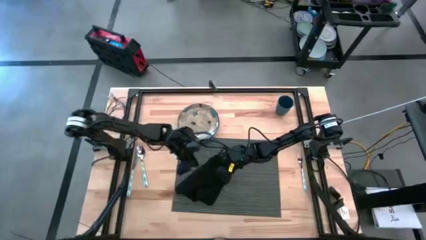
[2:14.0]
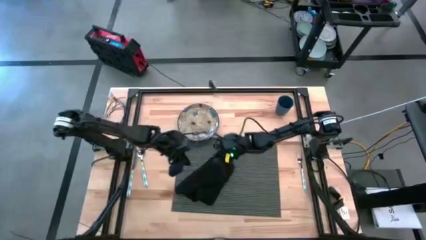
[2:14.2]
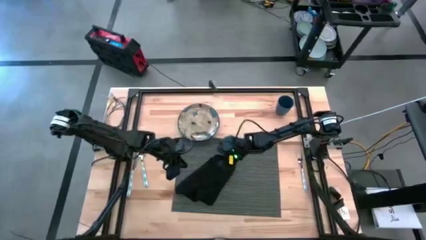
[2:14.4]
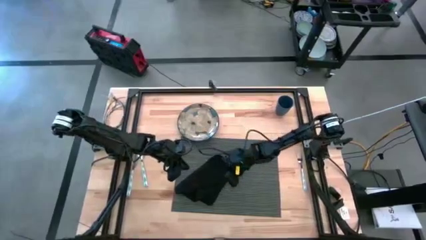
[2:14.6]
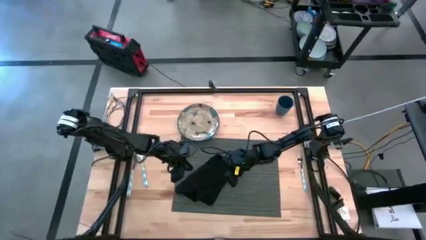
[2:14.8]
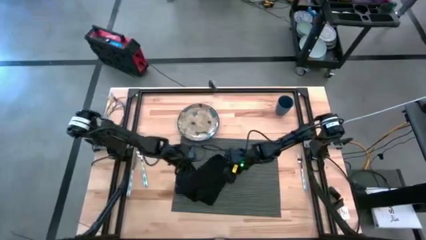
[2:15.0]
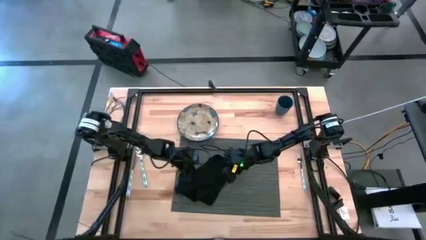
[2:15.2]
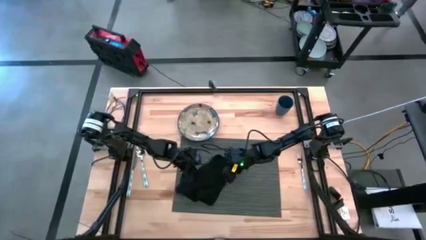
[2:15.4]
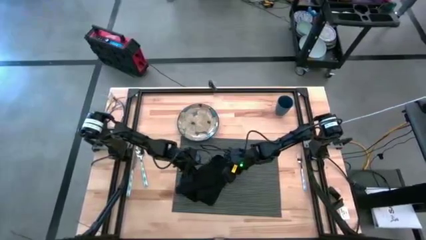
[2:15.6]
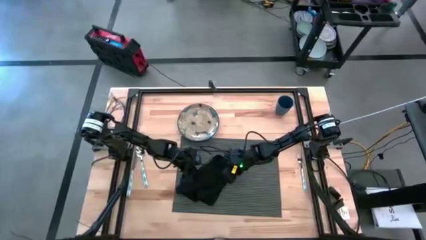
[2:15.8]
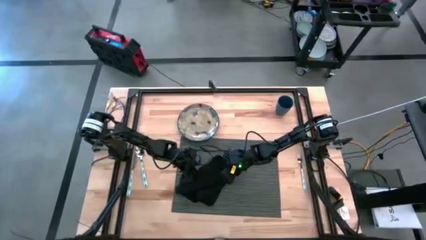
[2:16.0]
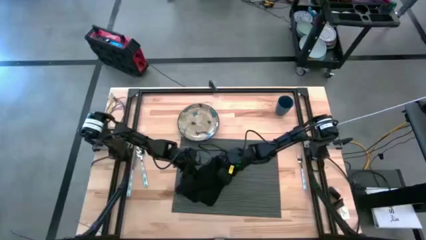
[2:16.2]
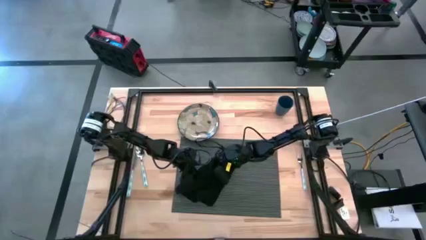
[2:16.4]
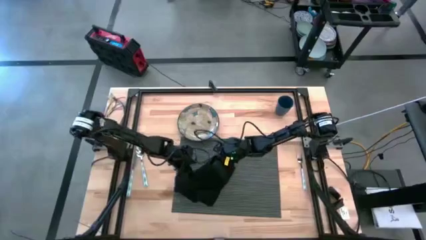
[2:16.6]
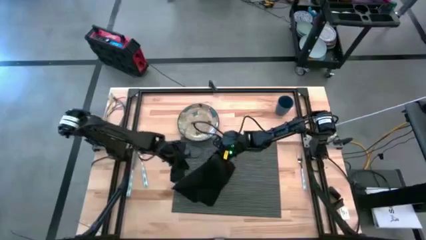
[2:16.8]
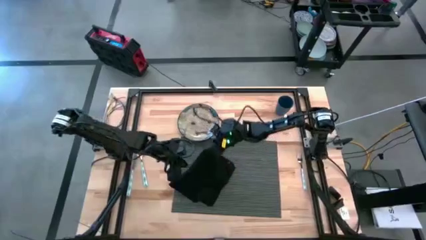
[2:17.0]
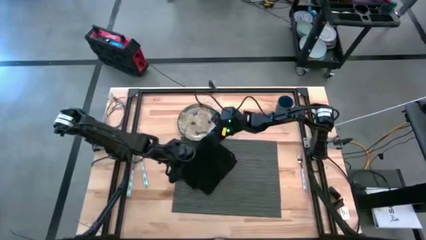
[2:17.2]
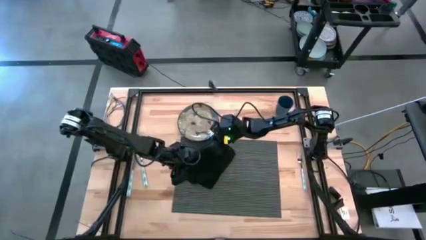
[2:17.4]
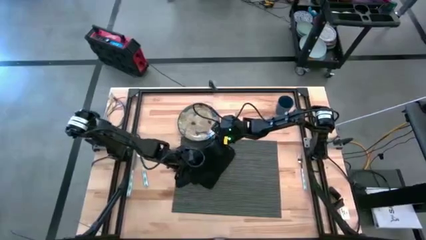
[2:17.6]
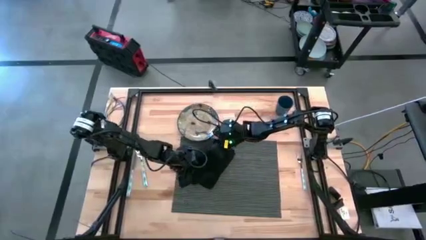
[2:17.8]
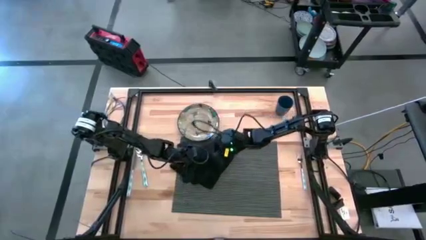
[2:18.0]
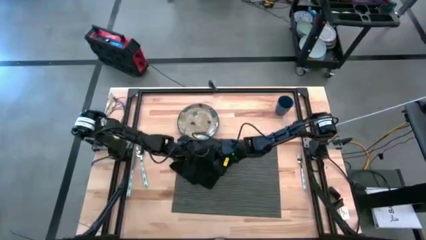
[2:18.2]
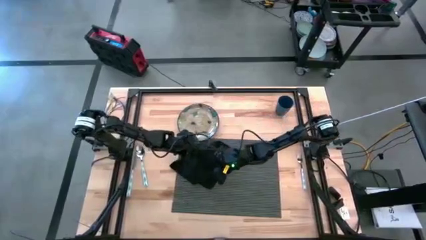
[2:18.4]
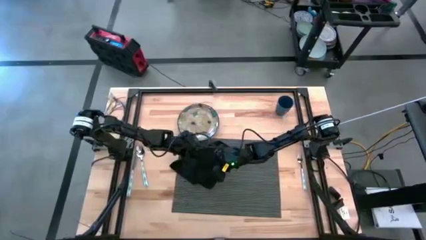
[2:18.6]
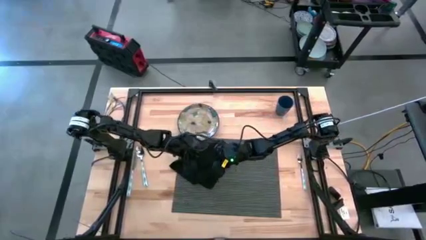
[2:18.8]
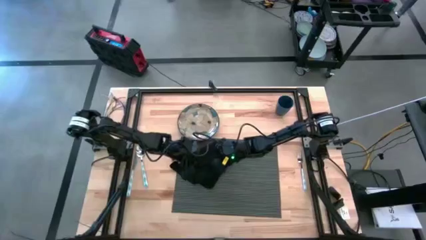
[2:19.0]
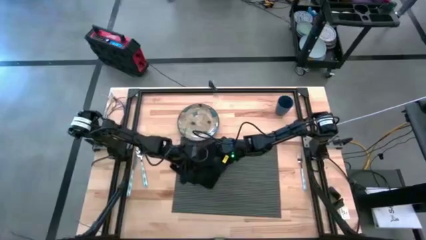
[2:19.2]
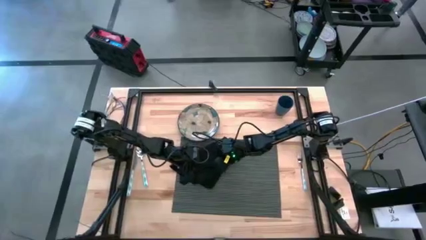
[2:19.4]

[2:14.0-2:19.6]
Task: Set table place
Fold the black napkin

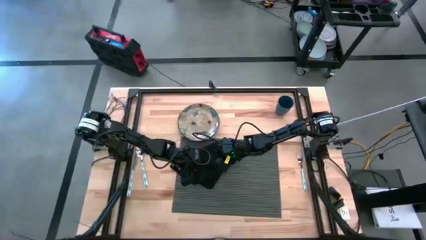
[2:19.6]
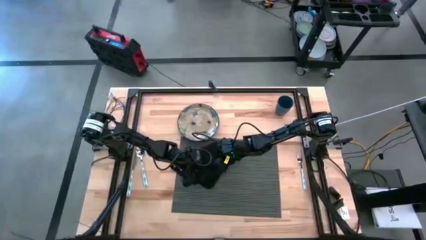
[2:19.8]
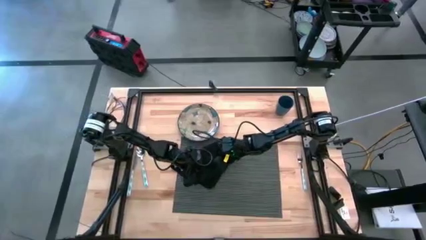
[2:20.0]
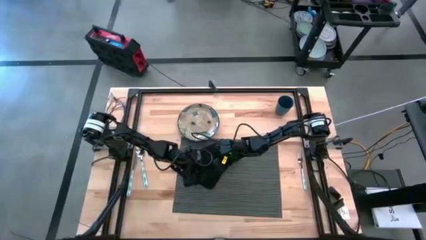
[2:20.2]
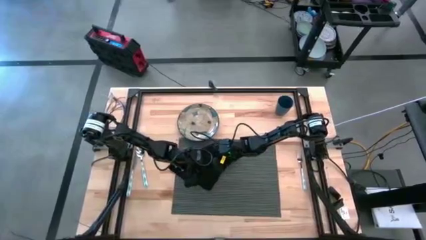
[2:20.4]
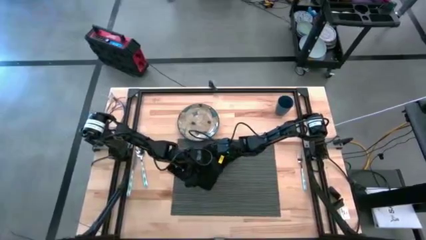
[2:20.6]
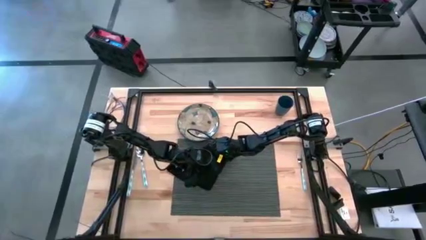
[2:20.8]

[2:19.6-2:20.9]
Fold the black napkin

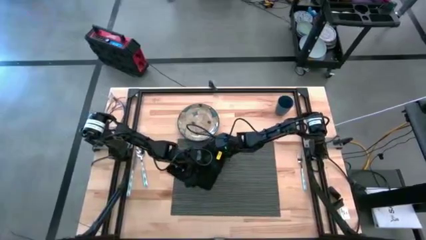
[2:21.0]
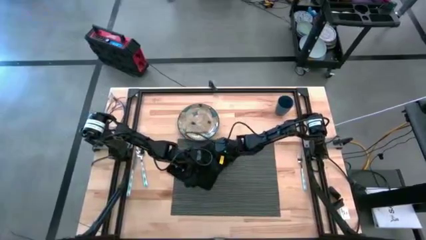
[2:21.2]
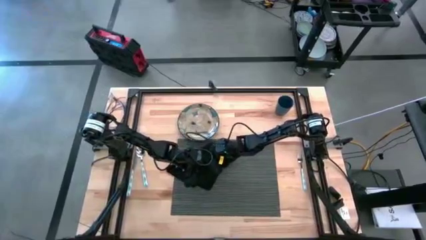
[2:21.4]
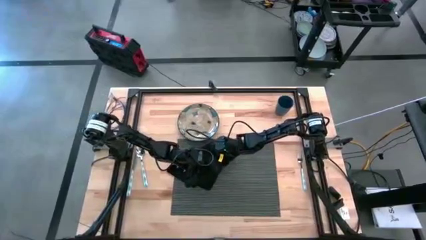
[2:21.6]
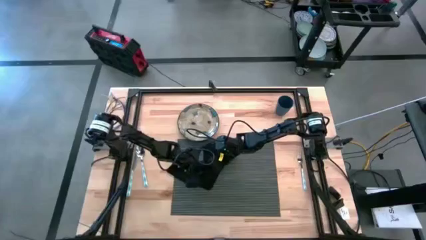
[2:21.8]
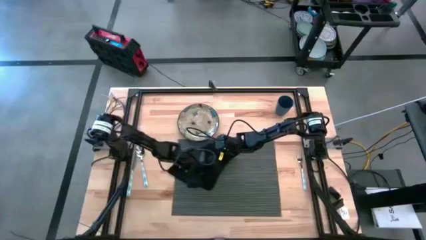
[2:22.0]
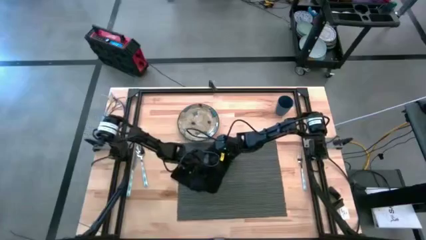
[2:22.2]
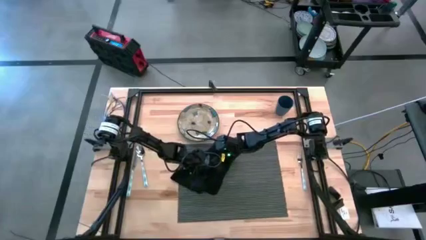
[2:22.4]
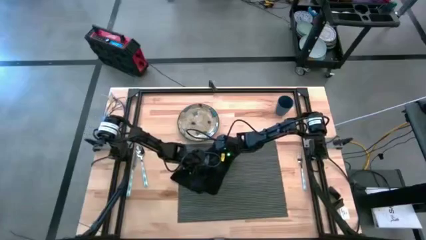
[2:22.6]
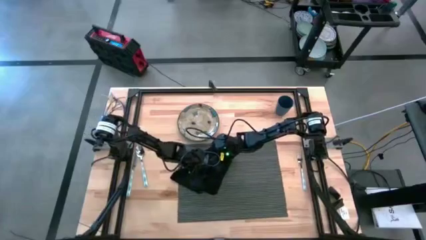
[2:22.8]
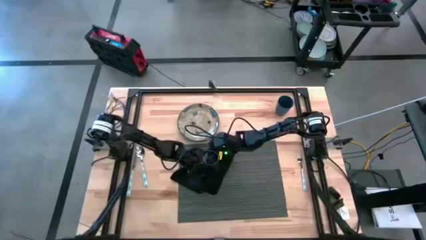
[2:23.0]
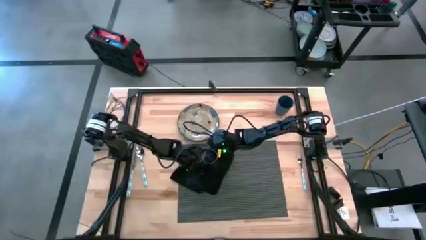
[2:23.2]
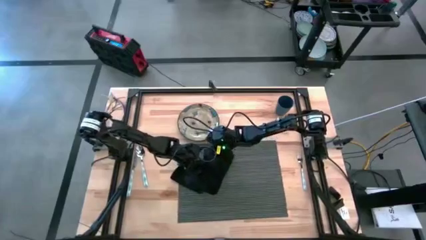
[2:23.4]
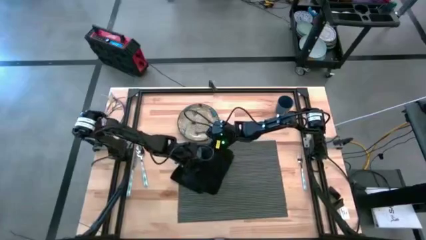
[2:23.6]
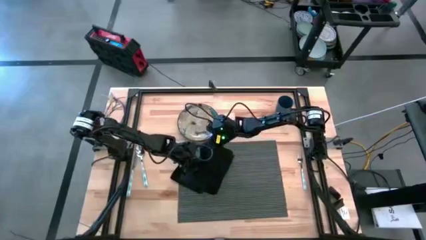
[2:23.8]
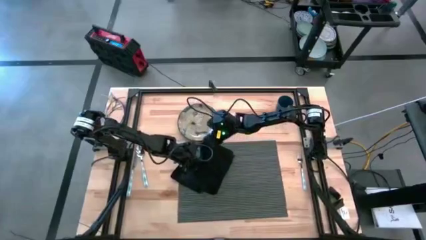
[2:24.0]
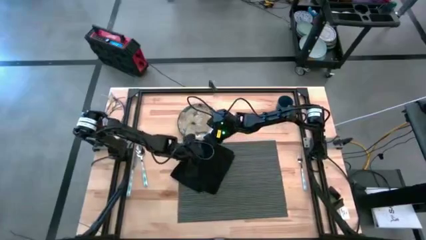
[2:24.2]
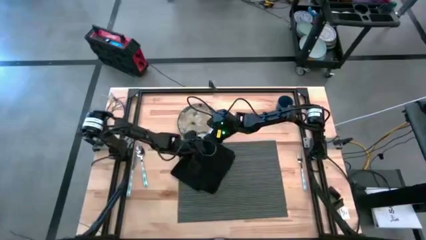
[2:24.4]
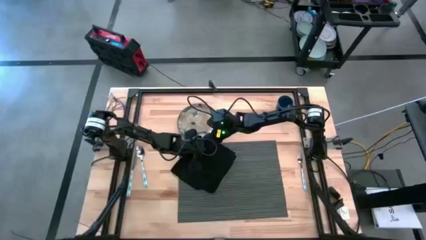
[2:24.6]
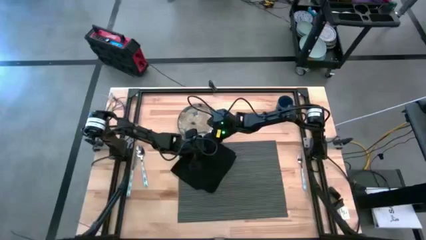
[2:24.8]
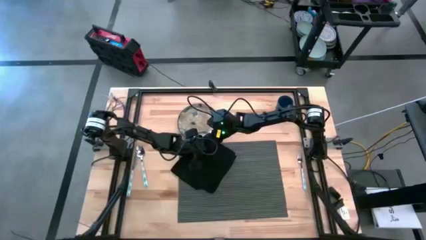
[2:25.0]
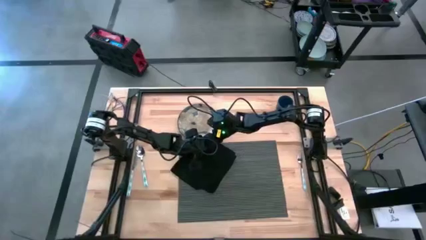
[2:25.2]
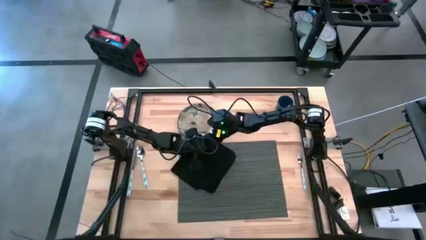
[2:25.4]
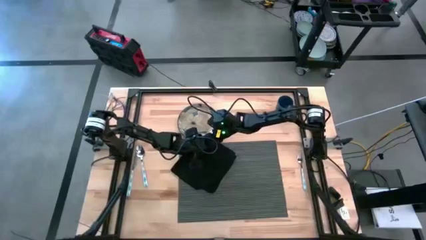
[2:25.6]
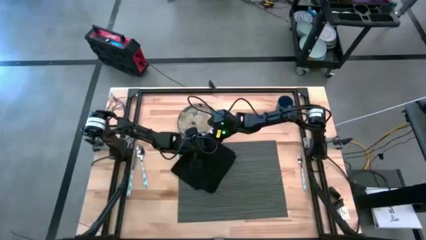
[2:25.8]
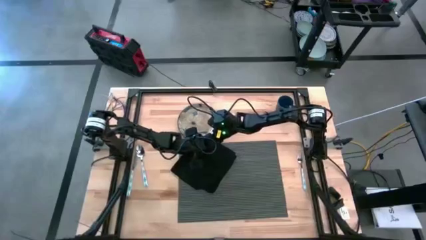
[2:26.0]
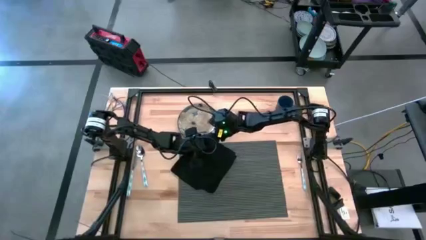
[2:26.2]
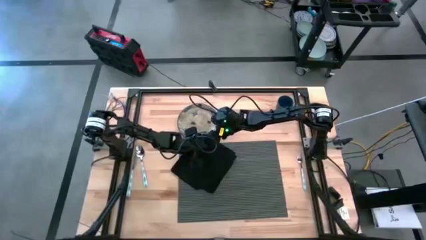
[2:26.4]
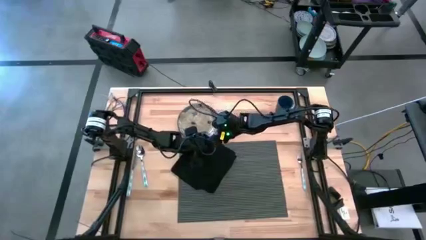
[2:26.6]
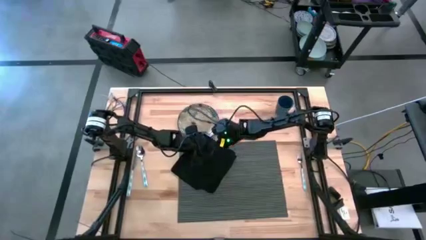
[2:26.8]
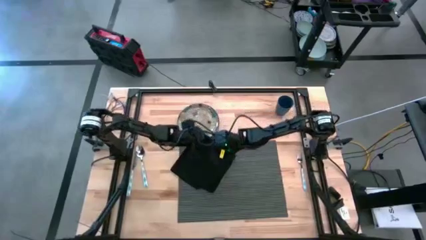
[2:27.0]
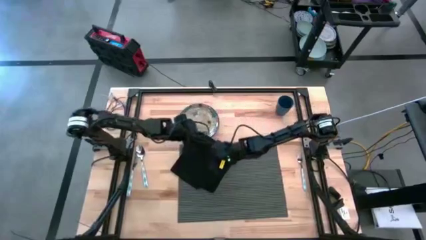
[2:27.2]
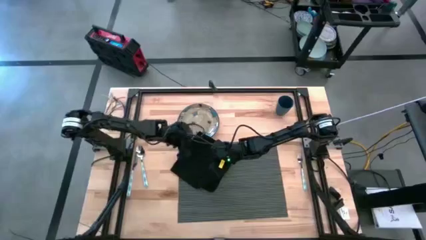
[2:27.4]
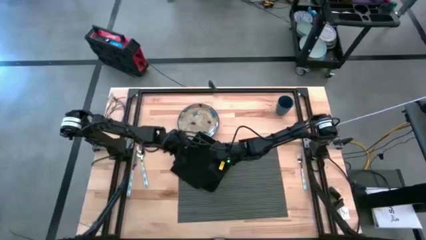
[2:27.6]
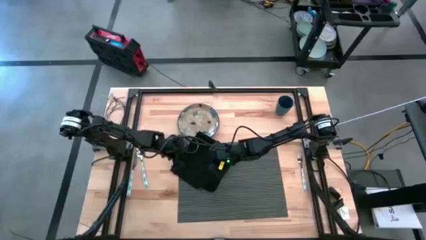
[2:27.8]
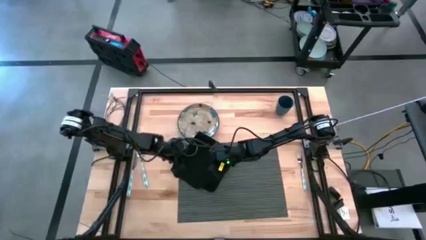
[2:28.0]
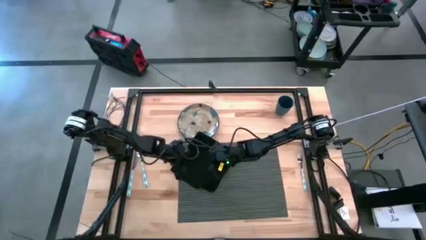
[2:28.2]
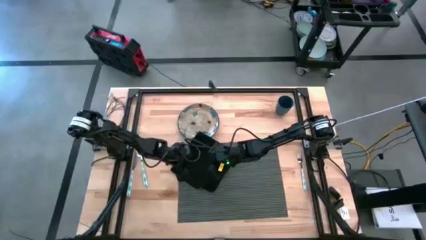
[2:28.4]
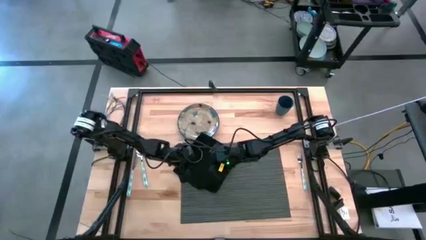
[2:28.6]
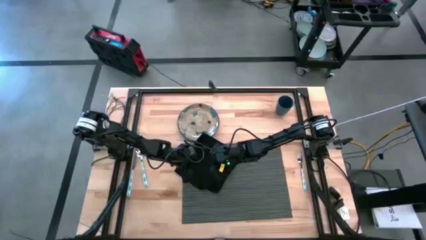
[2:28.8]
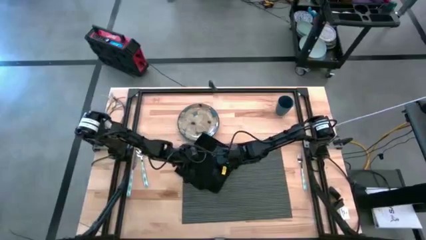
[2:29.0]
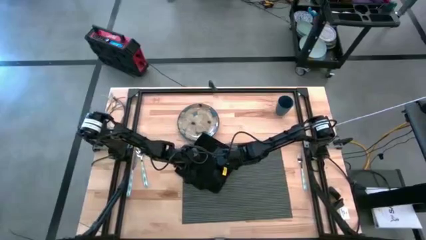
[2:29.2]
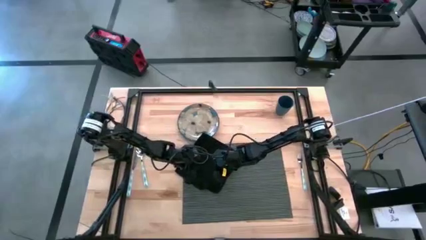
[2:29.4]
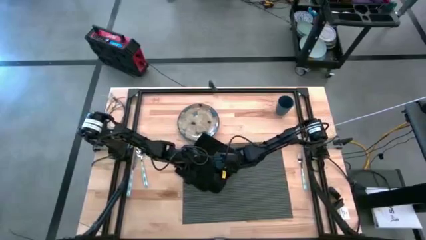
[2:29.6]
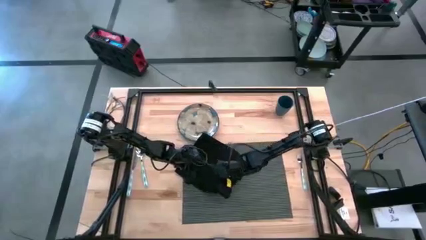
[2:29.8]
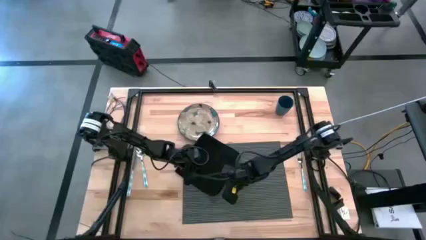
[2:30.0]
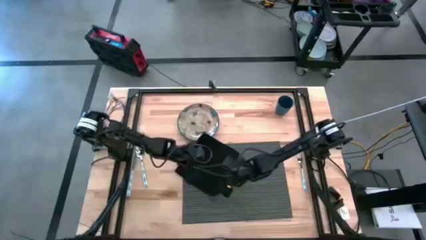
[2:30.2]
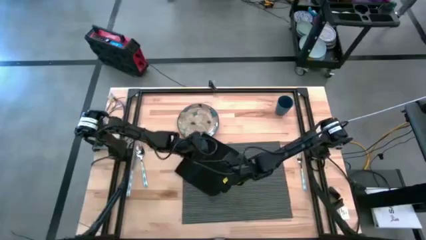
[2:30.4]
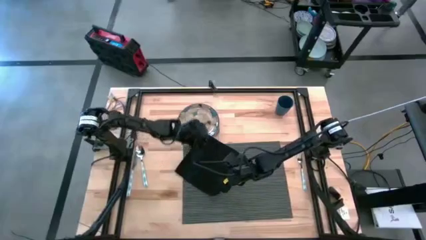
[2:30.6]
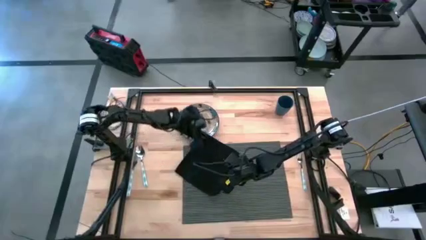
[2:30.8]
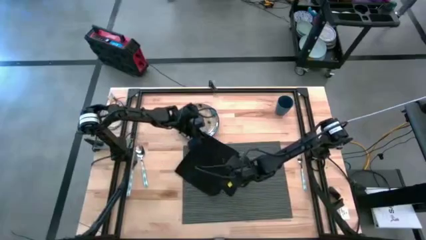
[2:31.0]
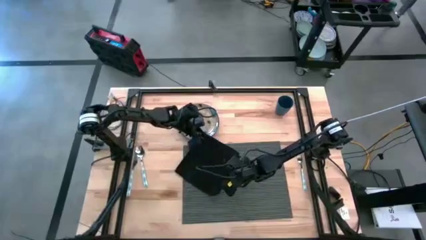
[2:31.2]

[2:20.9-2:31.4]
Fold the black napkin
